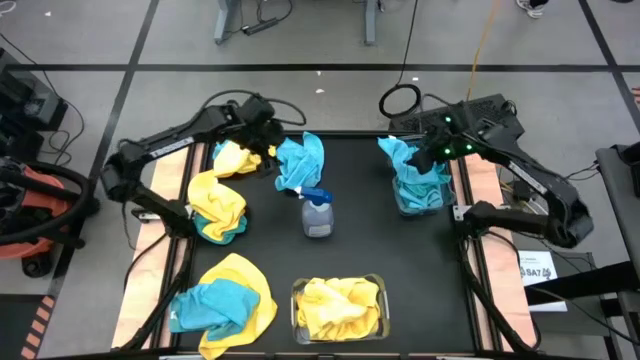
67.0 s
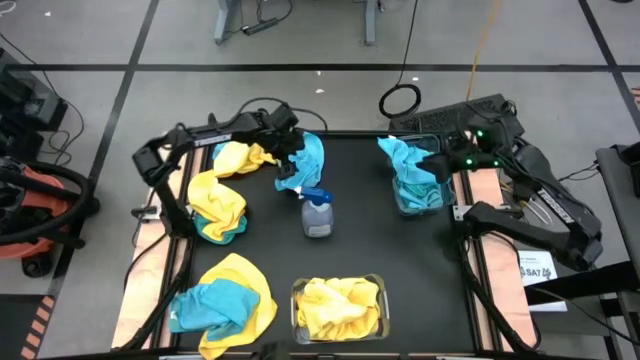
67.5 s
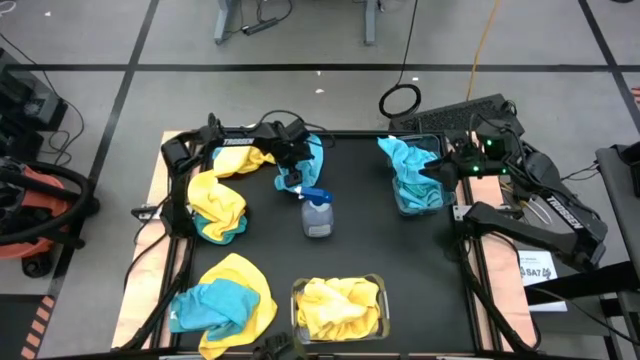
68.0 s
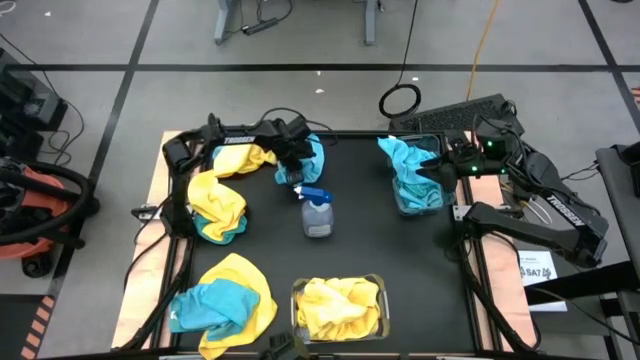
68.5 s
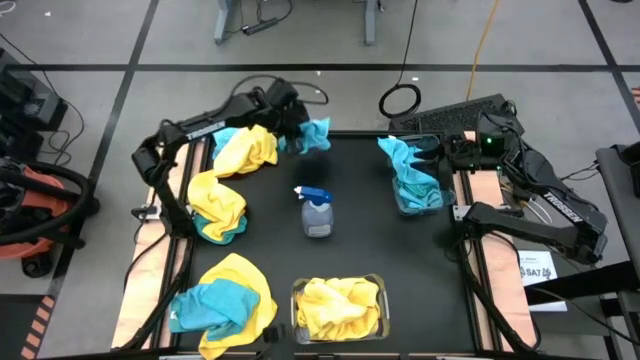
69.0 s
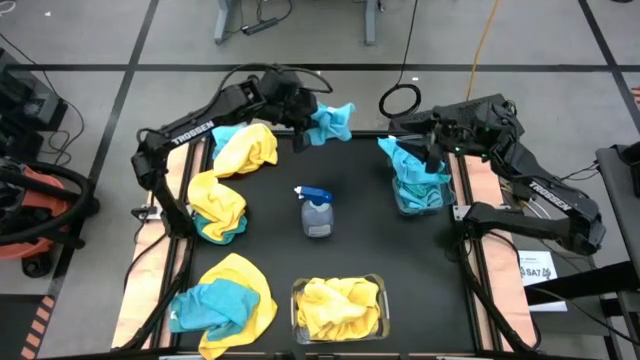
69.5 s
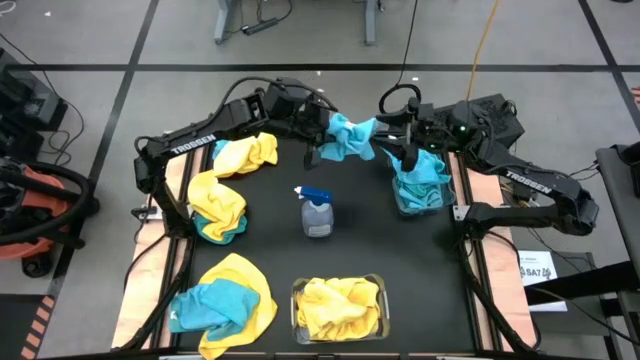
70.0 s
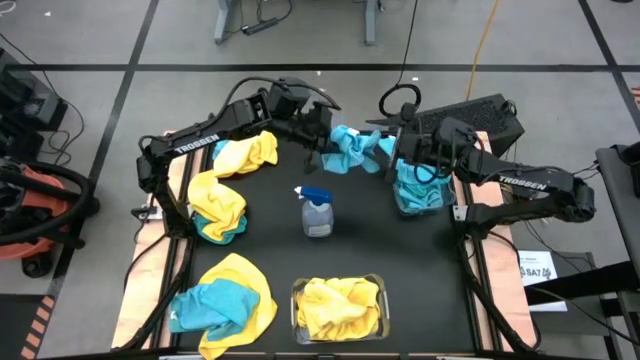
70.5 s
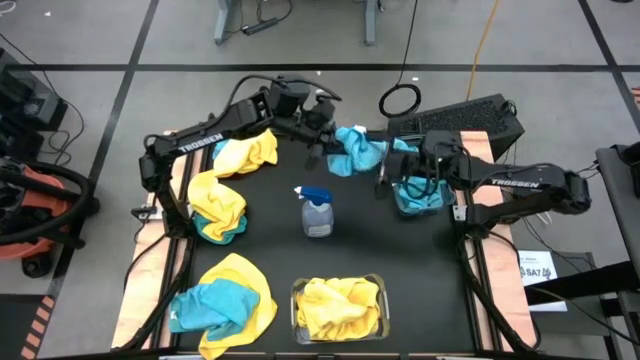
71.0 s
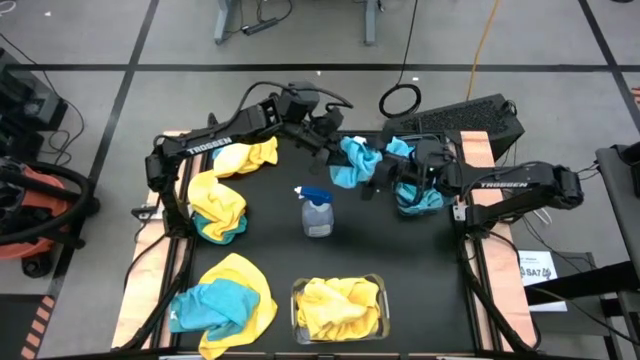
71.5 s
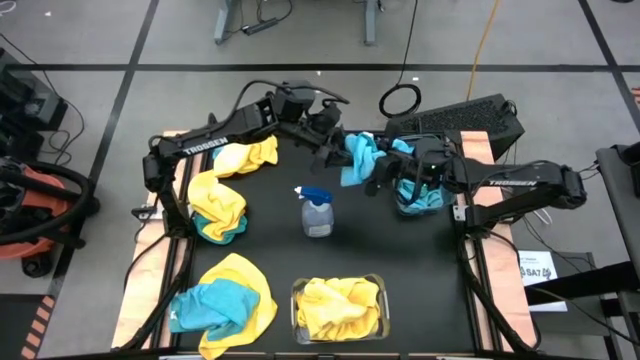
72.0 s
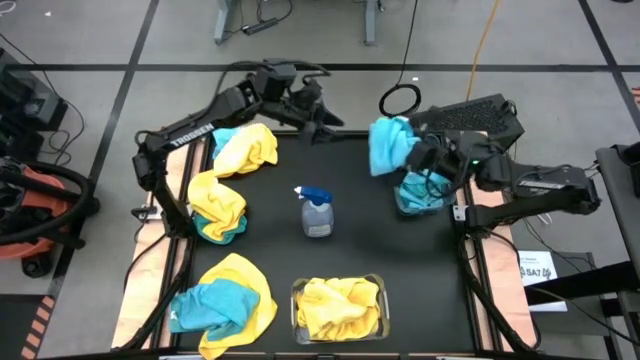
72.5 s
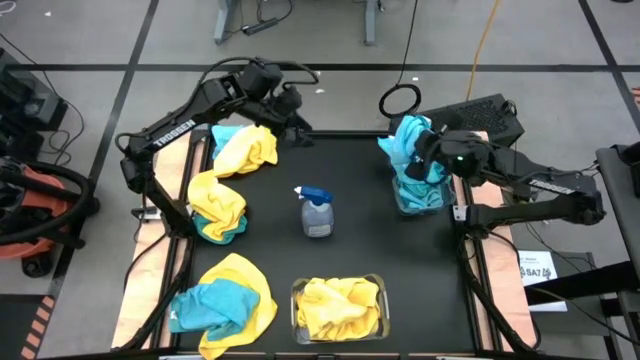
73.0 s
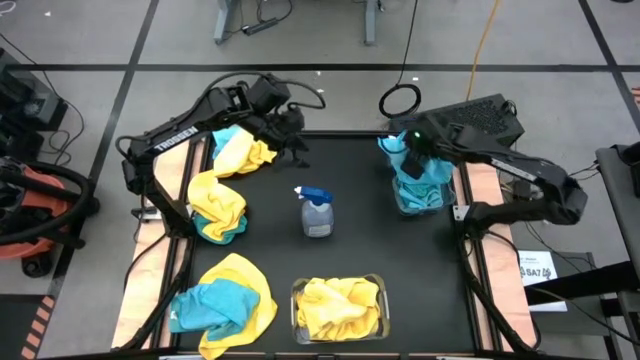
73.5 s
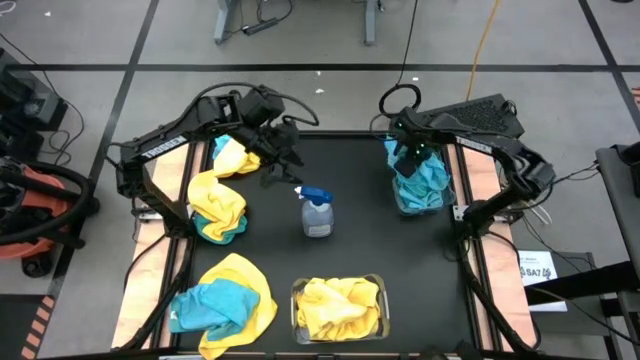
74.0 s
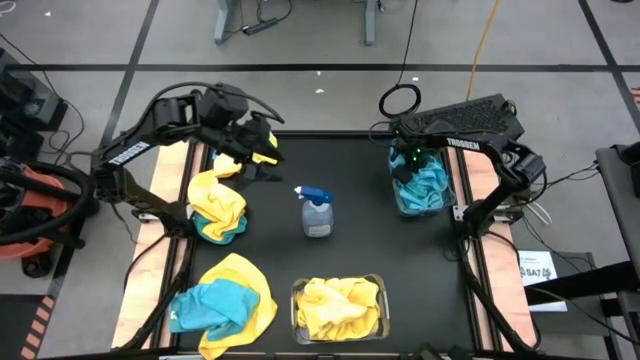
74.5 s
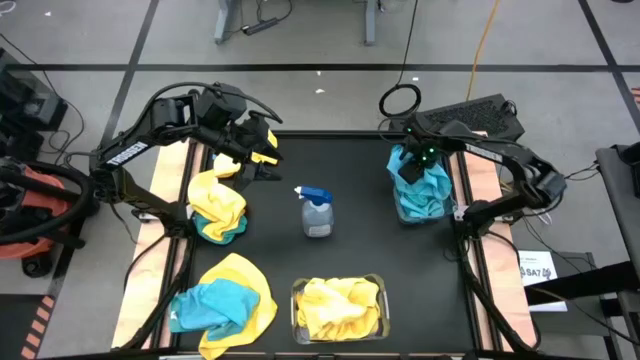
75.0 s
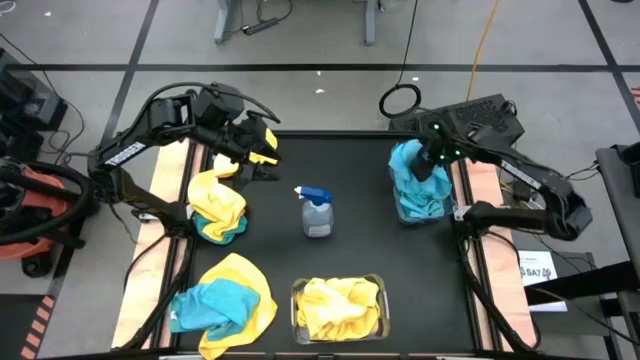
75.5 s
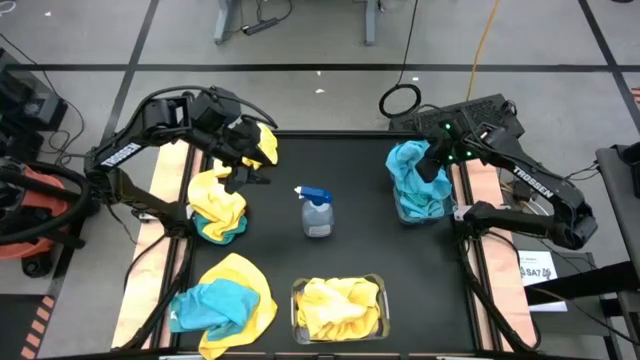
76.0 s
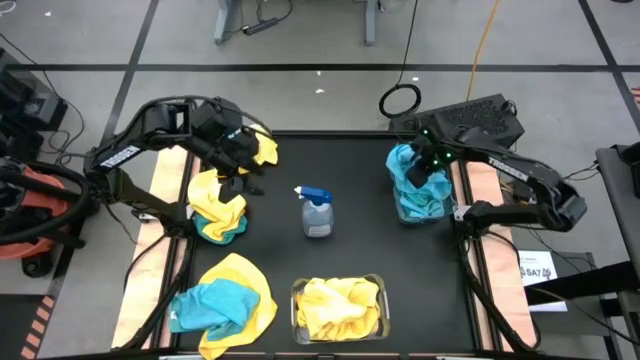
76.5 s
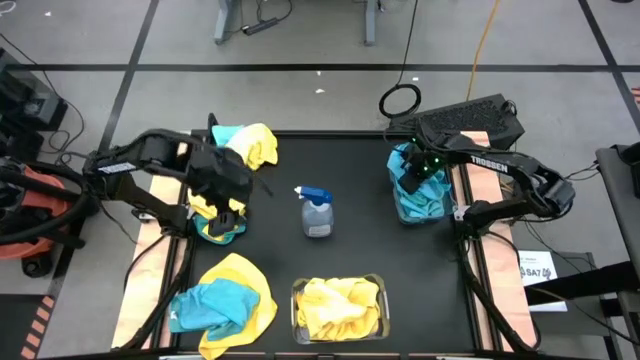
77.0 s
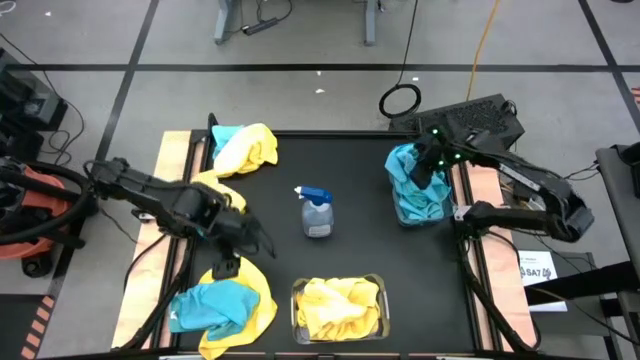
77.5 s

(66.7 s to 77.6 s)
Task: Sort microfiber towel by color & place in baskets
Put the blue towel into the top transparent bin

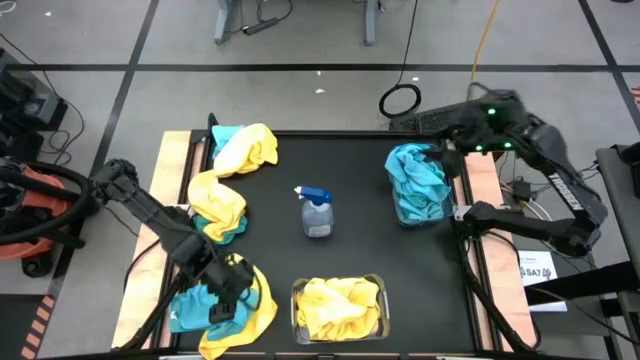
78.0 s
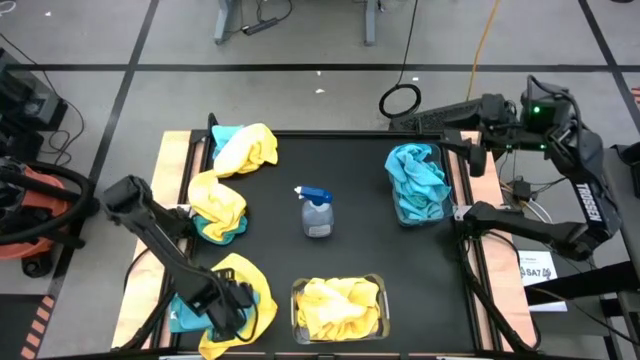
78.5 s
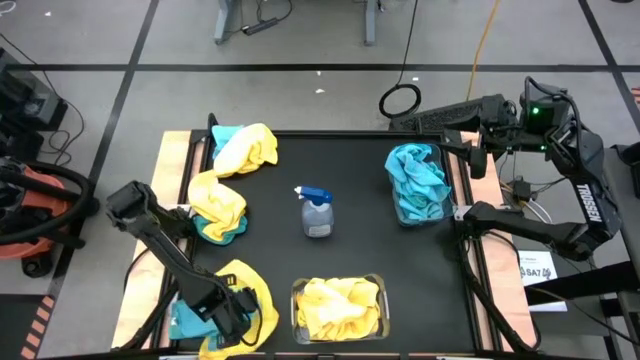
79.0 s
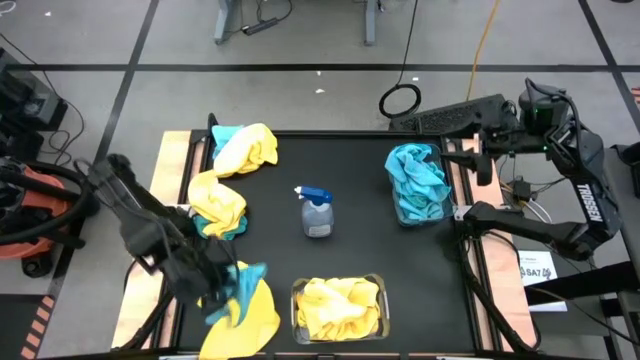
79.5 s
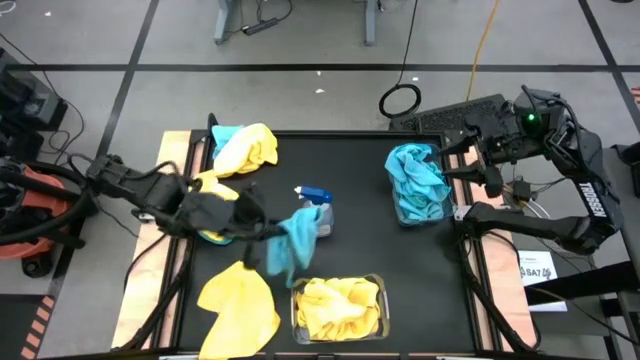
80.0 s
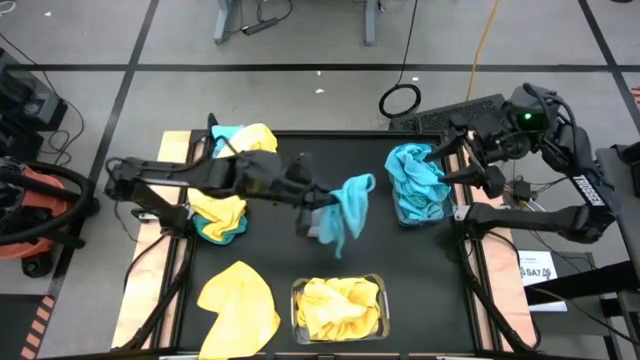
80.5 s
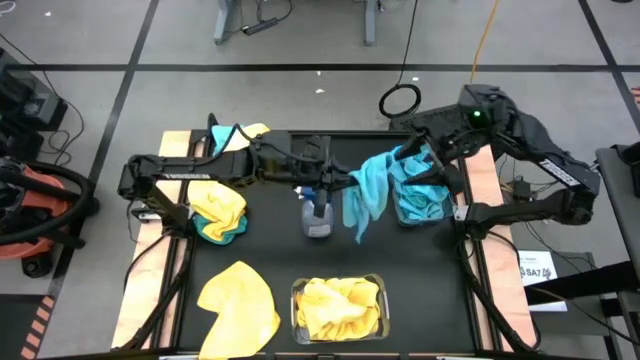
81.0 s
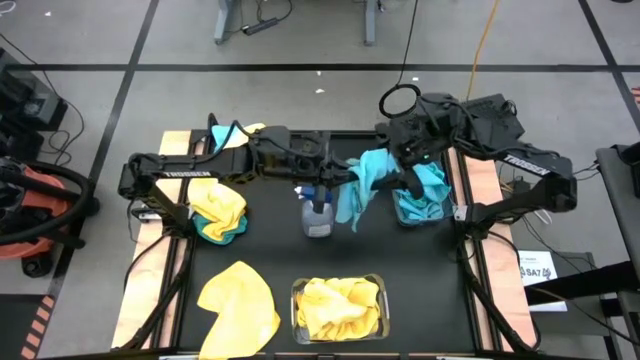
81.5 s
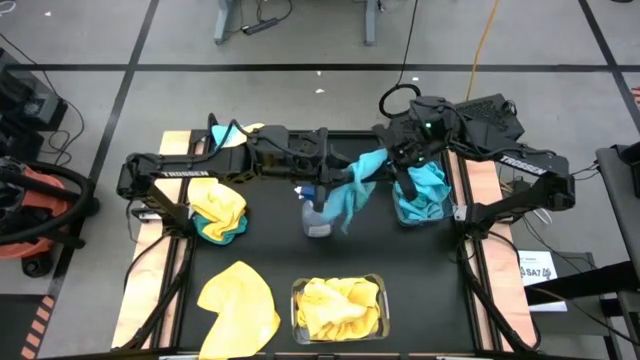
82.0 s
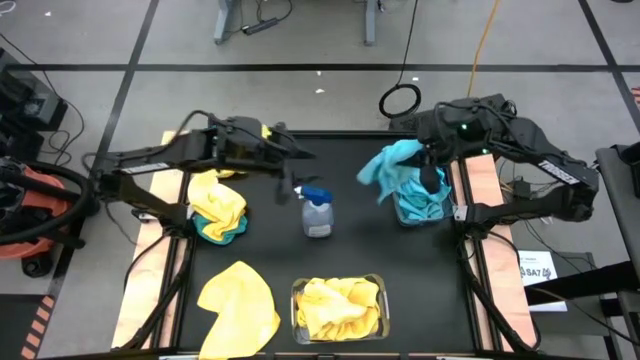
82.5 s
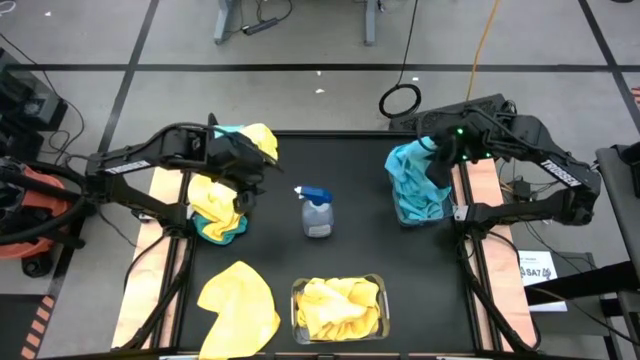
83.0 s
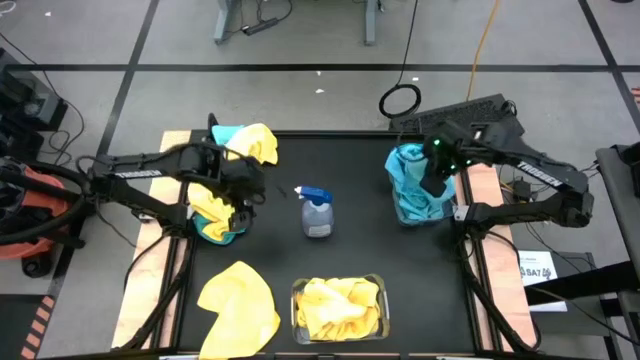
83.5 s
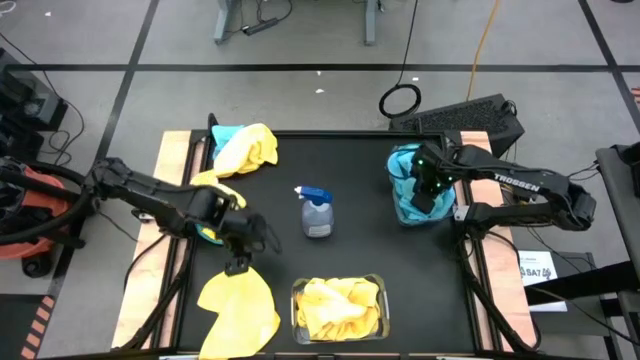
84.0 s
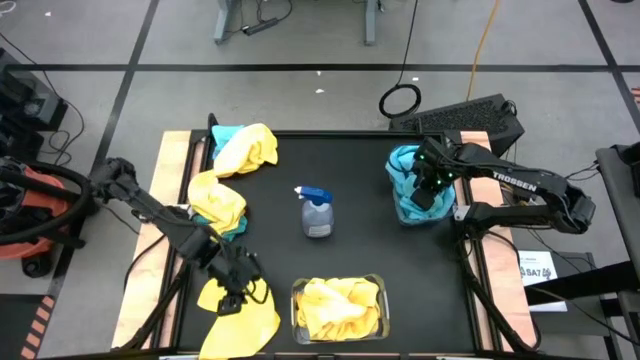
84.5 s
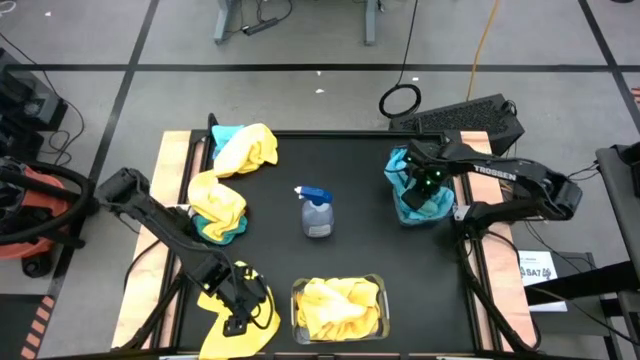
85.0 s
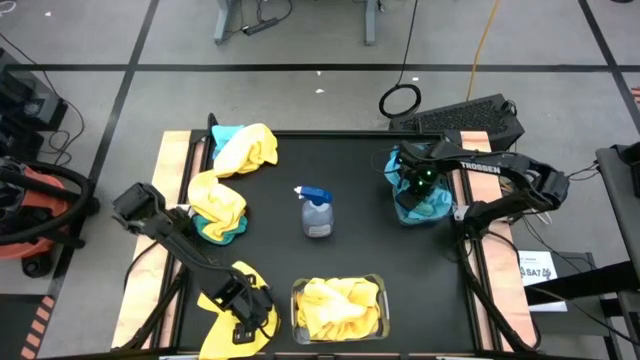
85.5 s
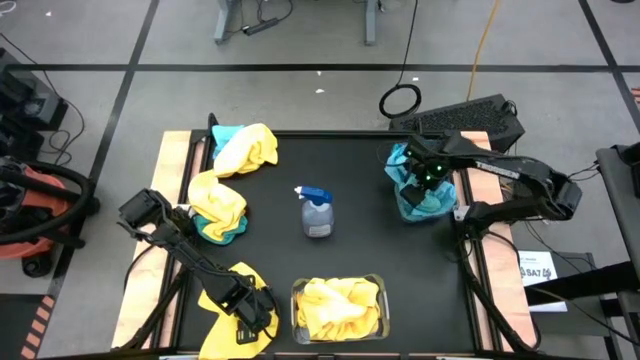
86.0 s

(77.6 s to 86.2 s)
Put the blue towel into the top transparent bin

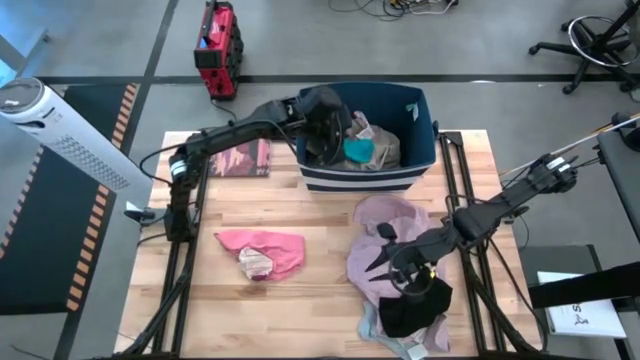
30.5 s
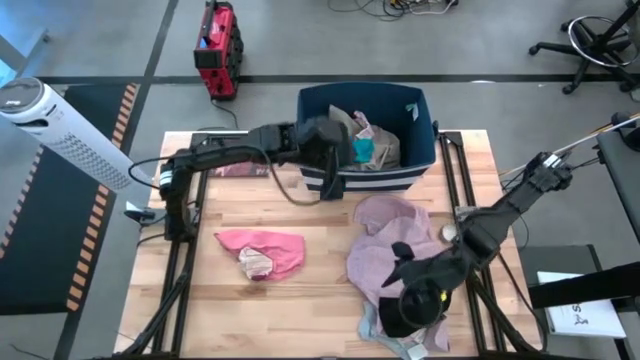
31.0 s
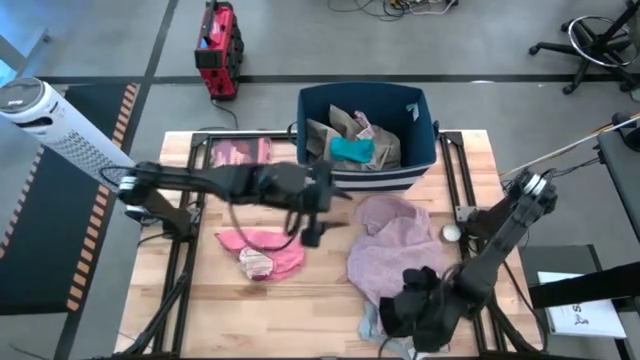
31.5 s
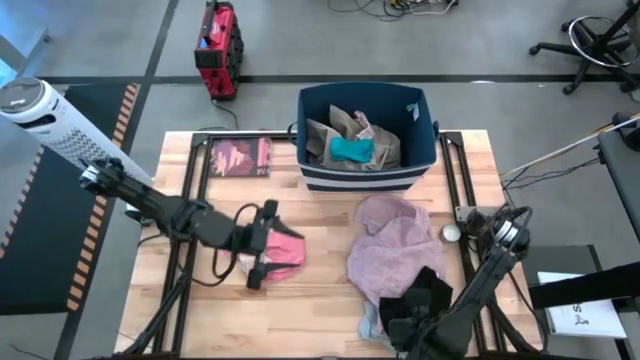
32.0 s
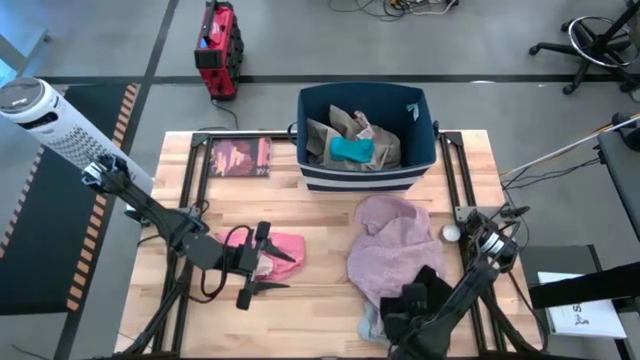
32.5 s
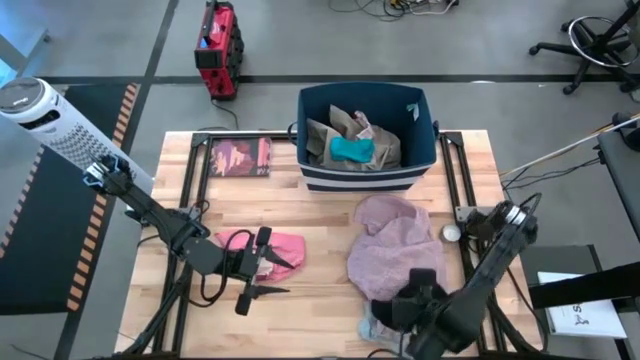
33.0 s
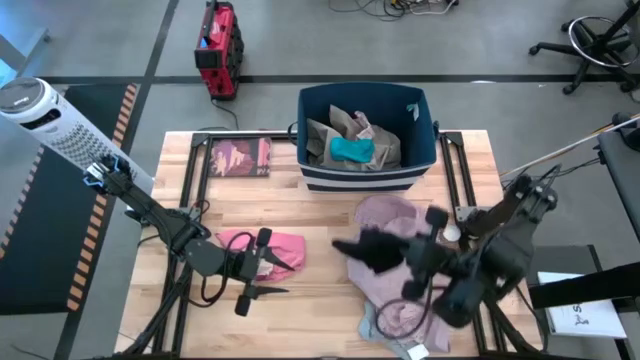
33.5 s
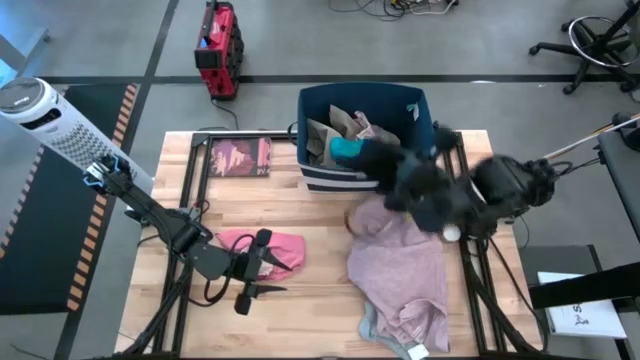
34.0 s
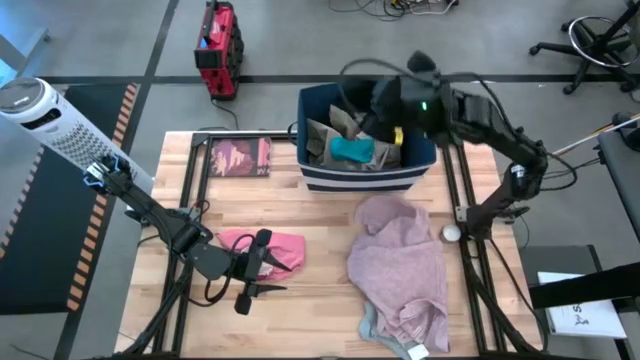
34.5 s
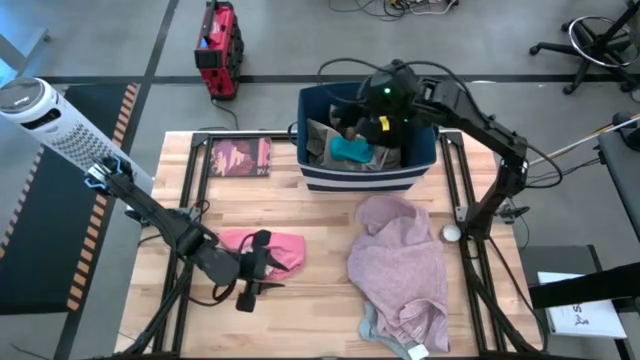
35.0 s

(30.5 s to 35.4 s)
Task: Sort clothes
Put the black shorts into the blue laundry bin
